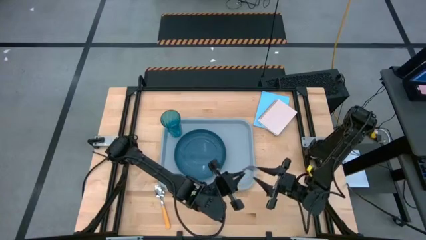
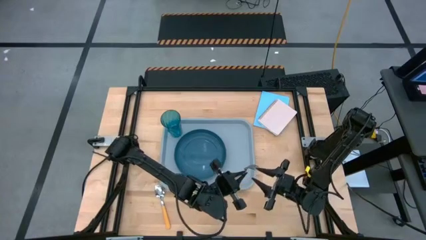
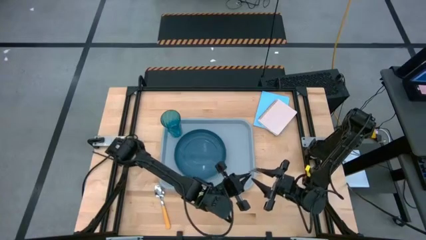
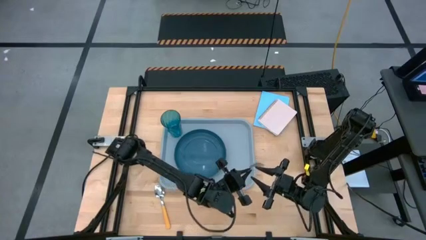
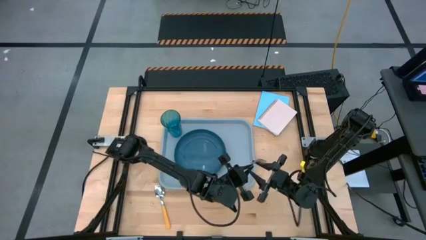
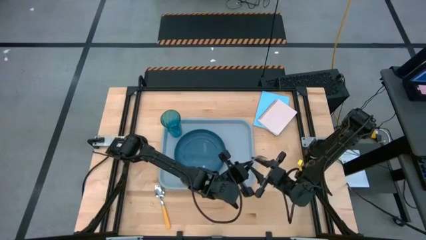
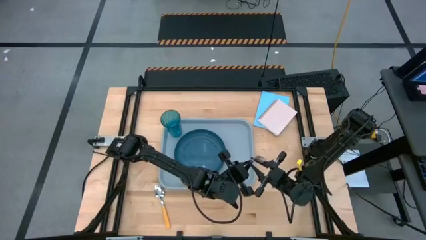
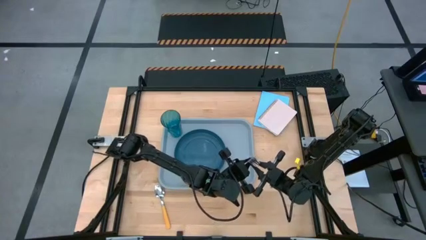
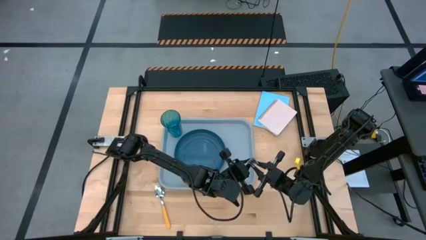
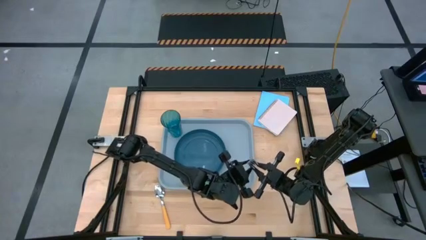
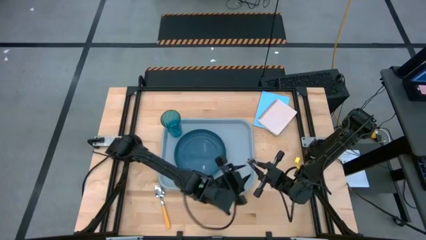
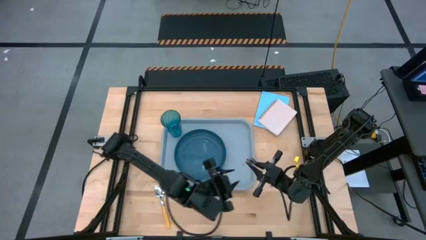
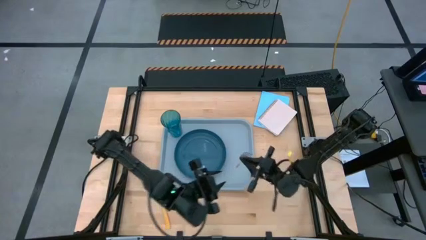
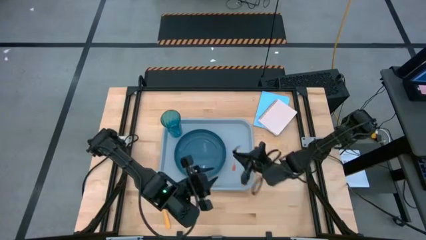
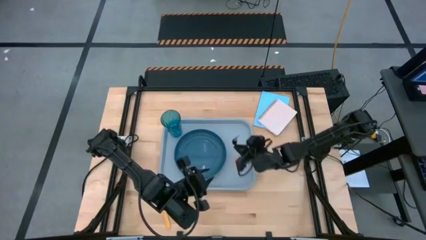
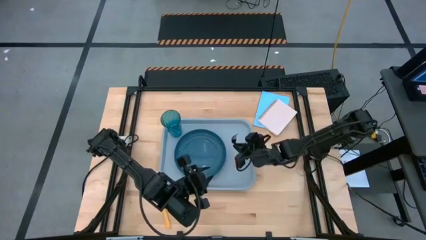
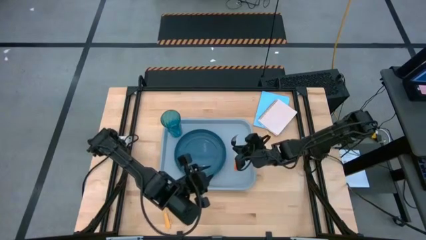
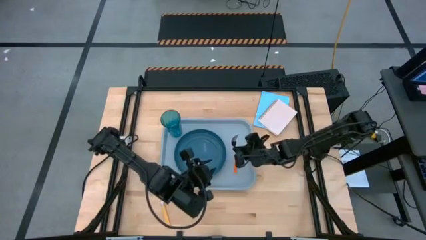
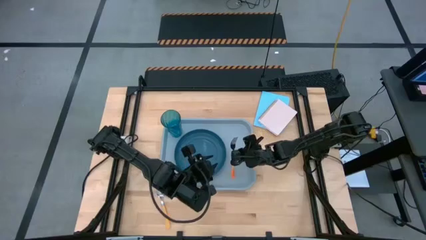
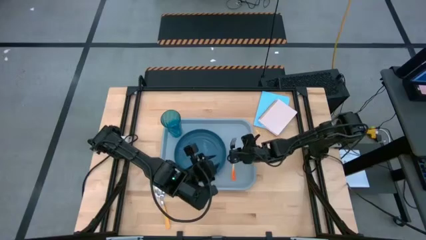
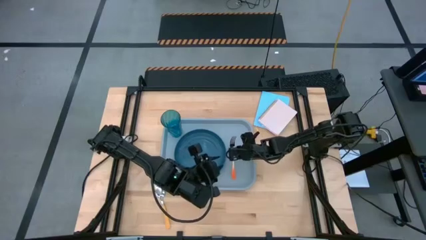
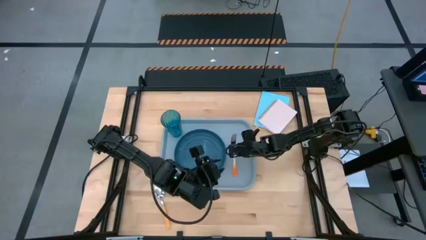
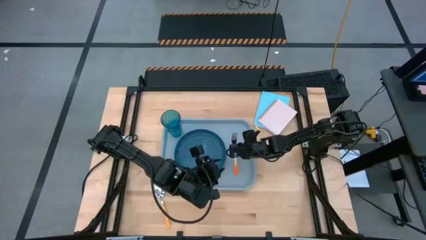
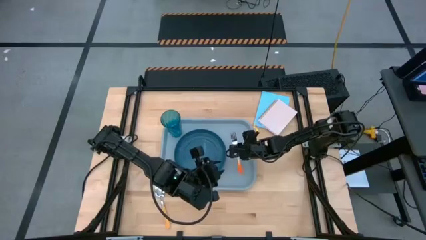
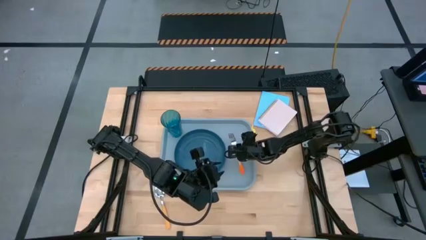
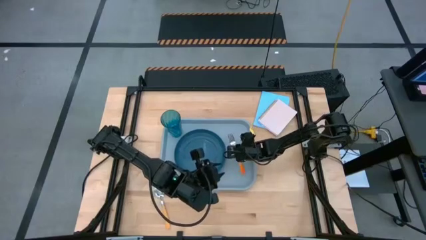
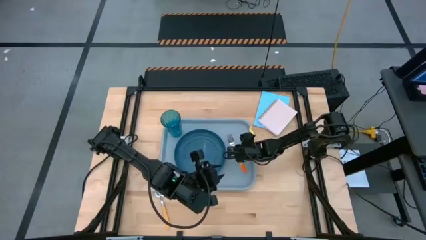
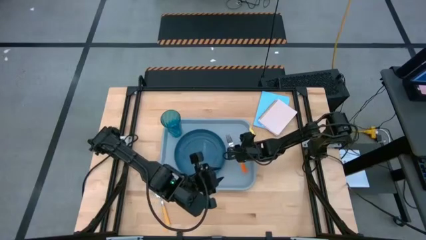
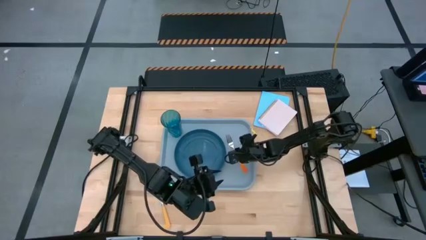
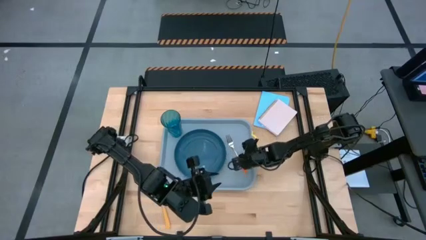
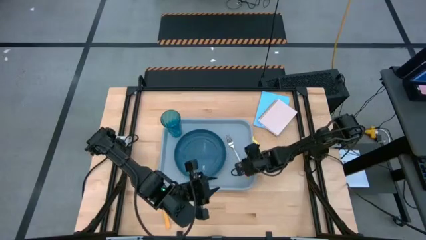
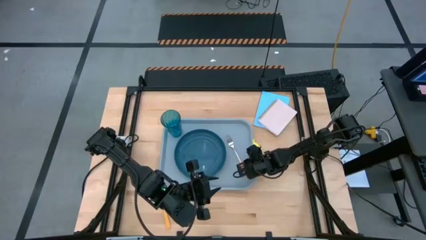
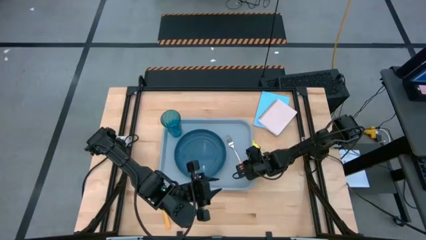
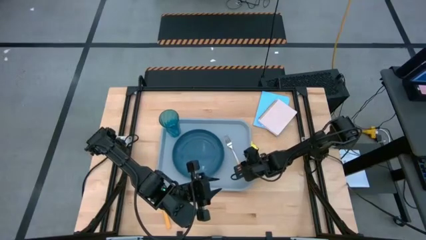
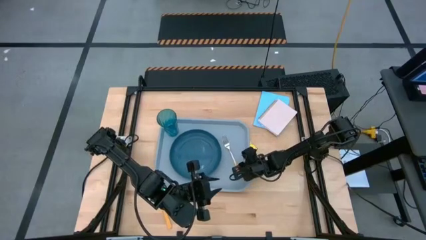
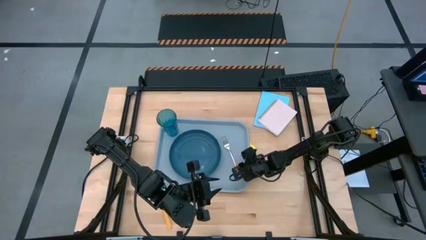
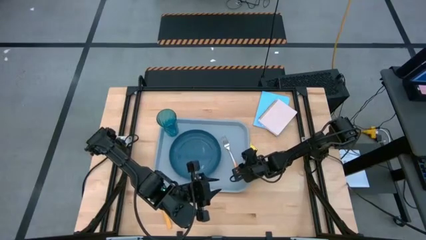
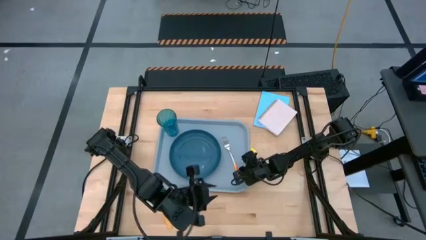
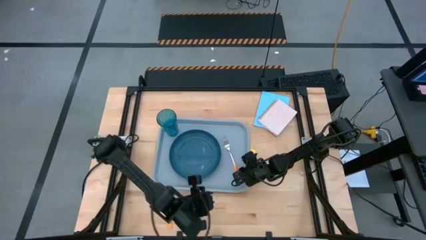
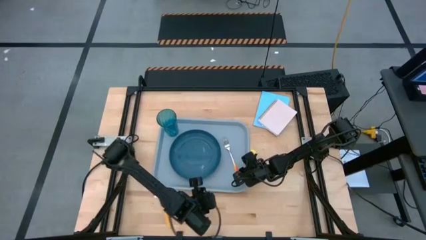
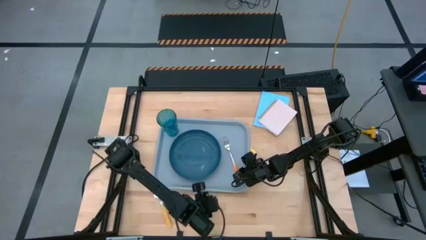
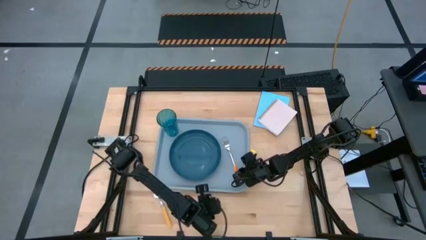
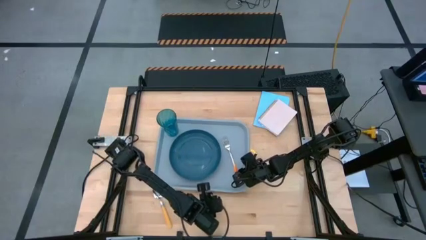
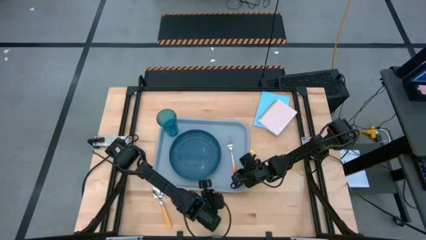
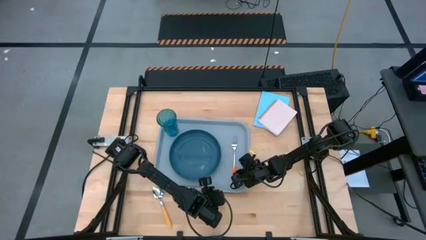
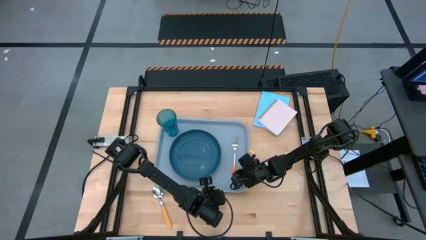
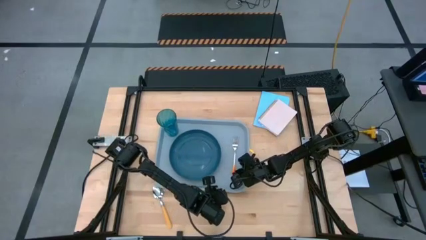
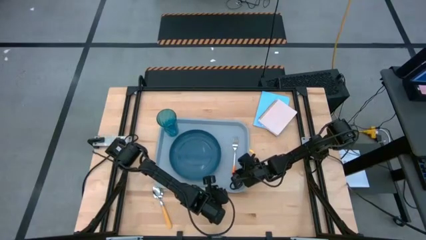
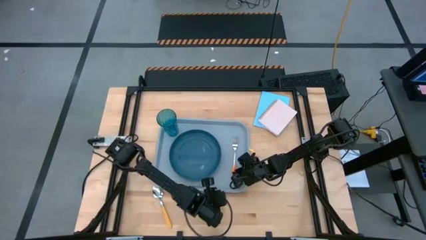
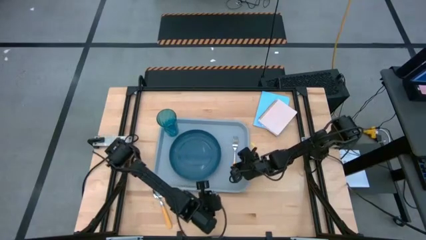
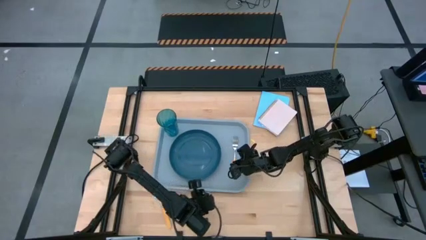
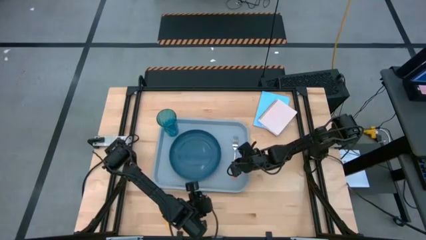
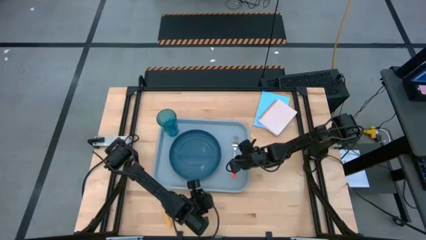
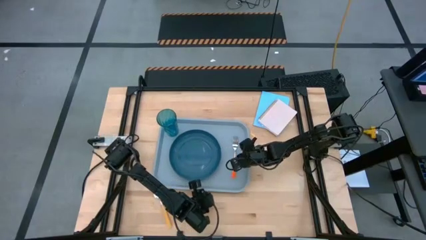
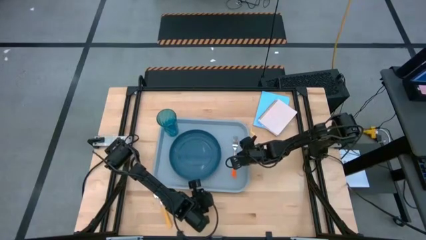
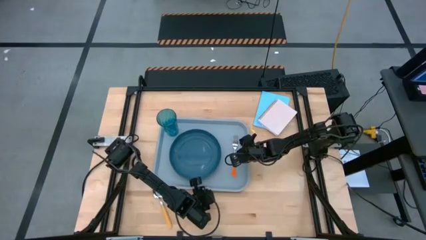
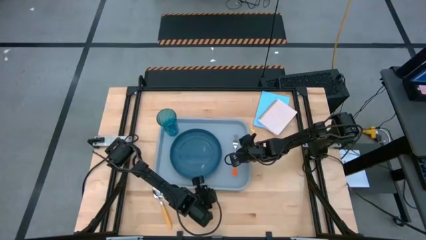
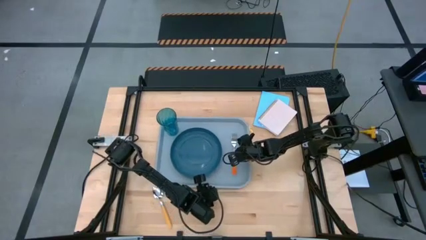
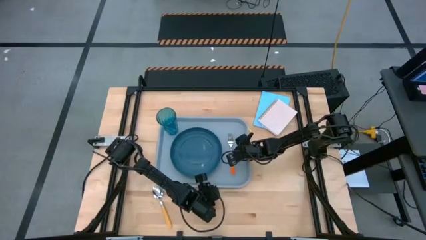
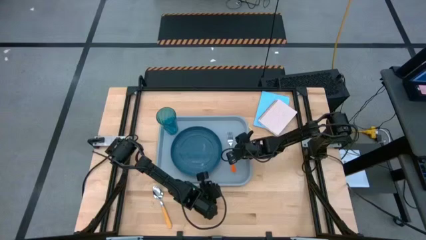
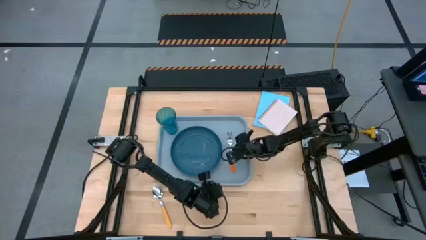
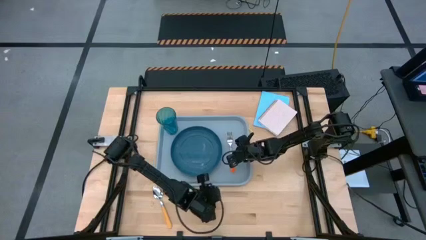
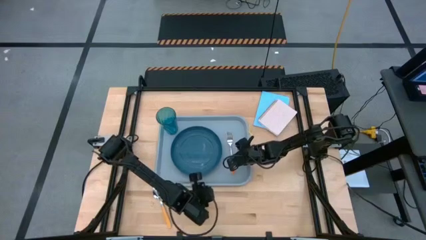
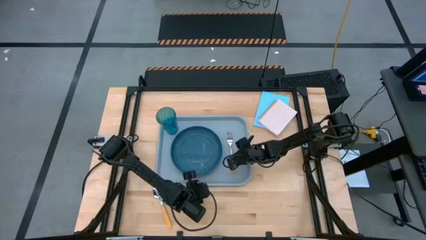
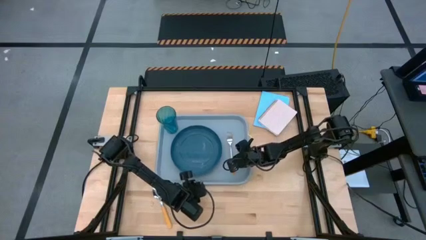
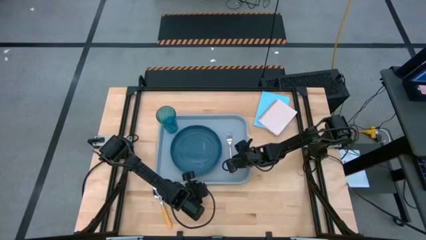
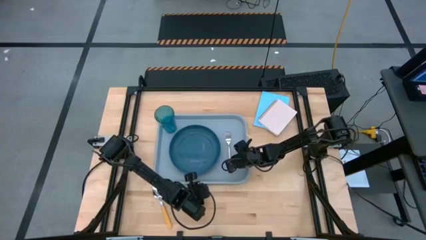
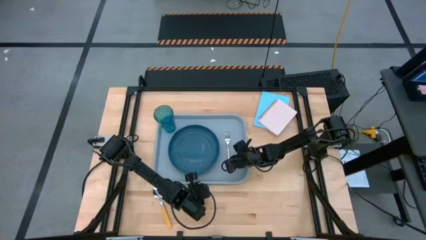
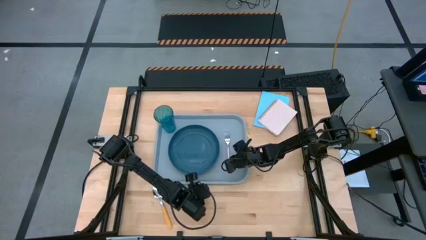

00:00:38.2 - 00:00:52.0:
Task: Pick and place plate/cup/fork/spoon on tray
Put the orange fork to the right of the blue plate on the gray serving tray

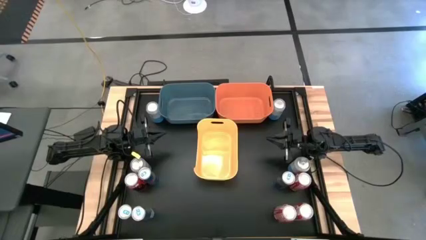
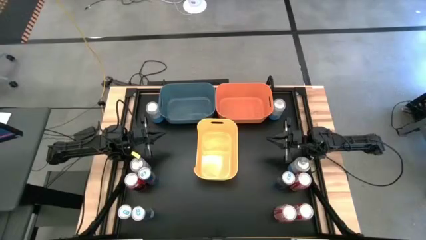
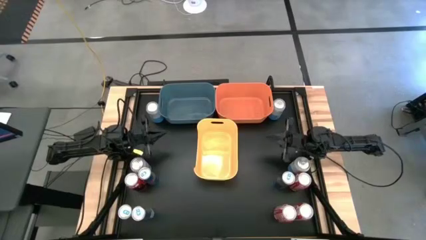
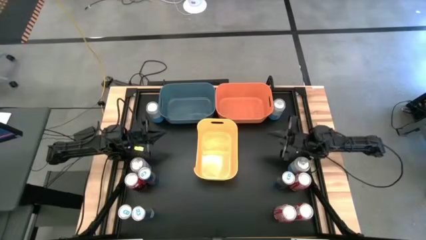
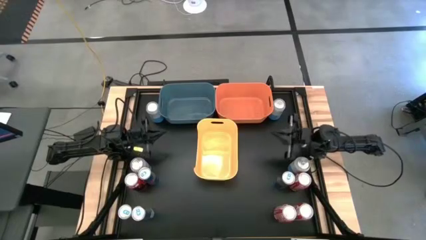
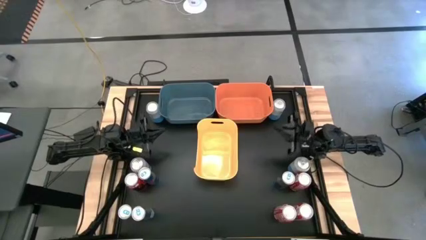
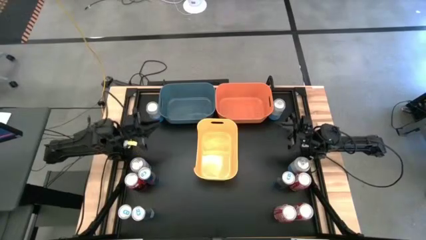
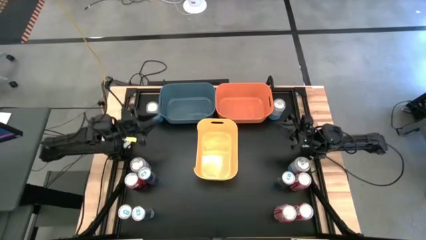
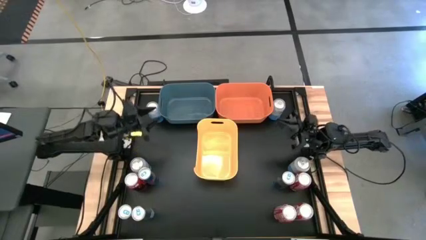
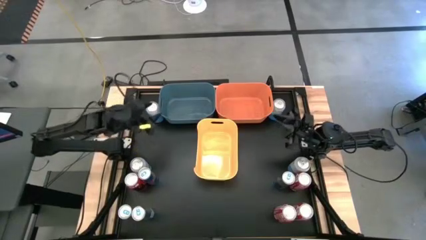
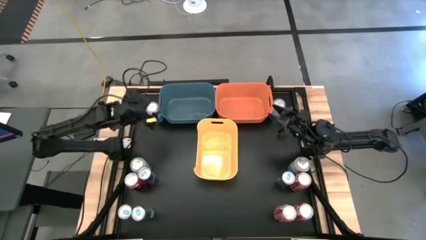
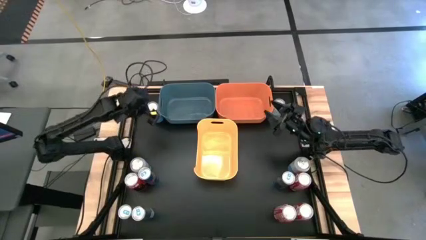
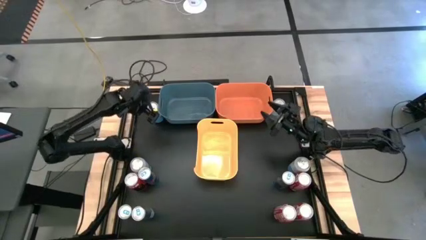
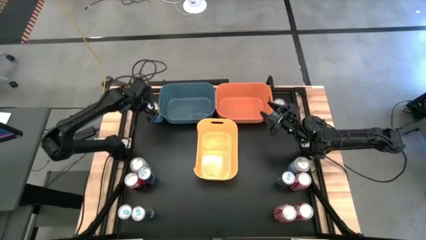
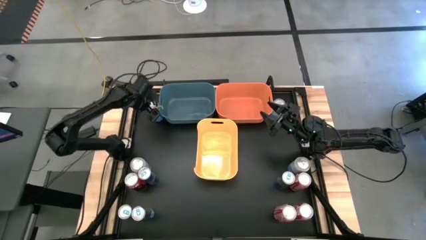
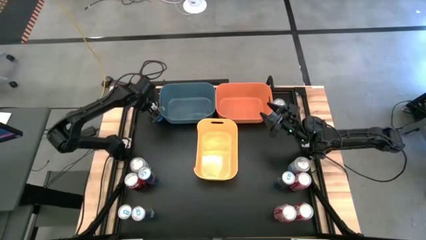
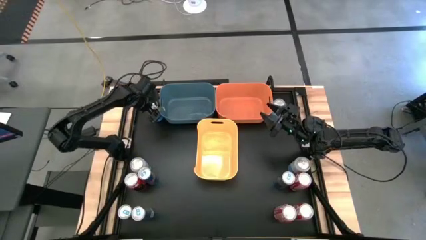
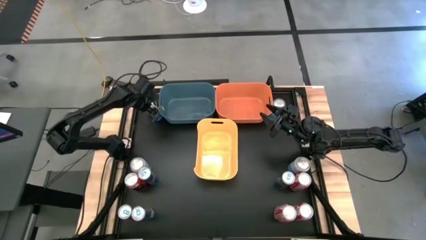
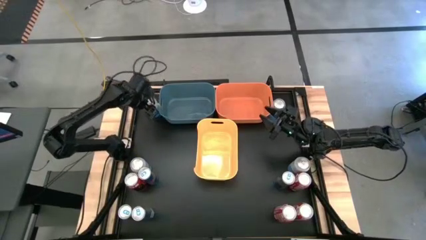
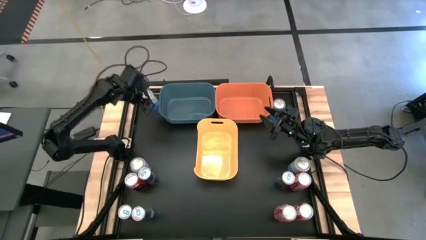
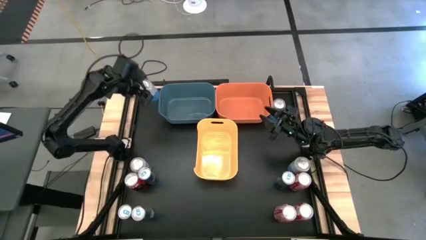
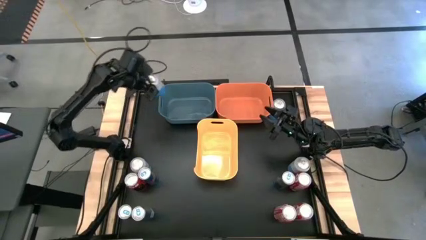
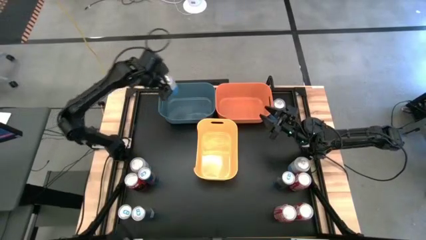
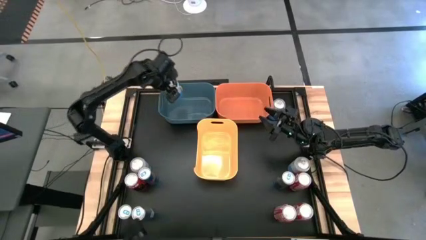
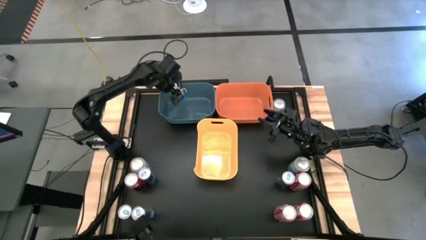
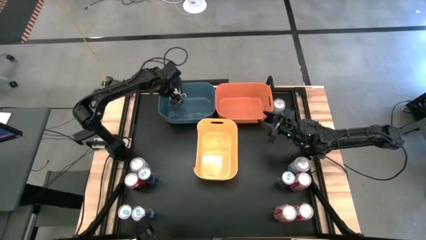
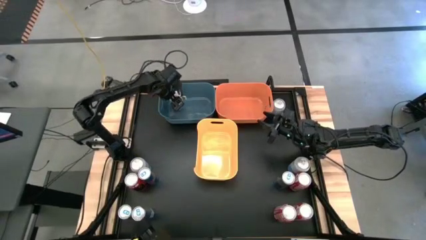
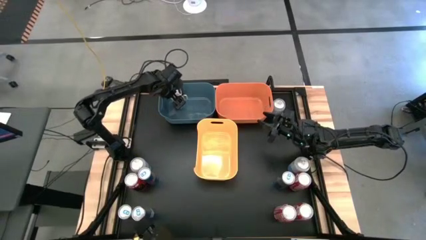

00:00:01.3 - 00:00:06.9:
Task: Sort soda cans
Put the top left blue-white soda can into the blue bin
